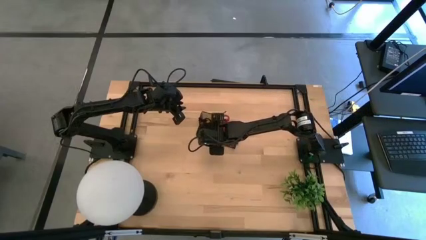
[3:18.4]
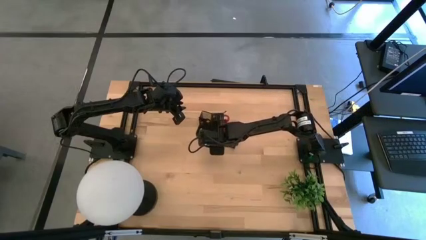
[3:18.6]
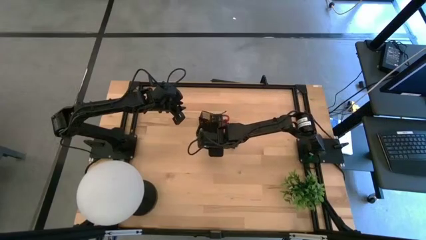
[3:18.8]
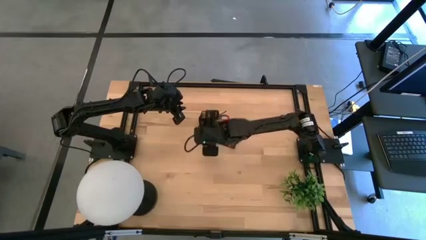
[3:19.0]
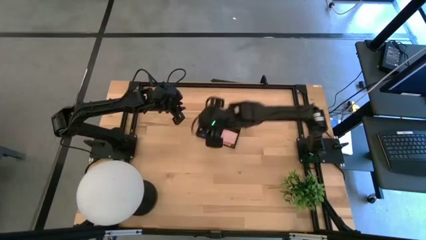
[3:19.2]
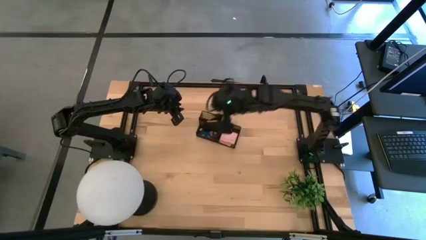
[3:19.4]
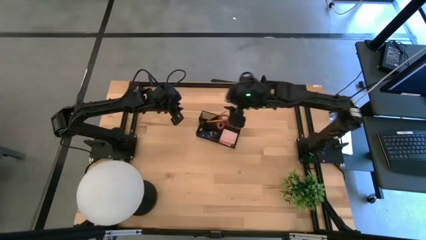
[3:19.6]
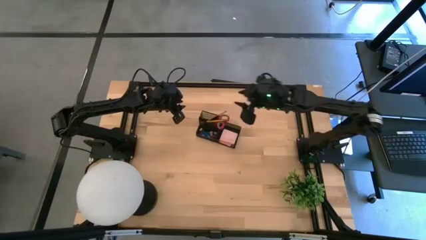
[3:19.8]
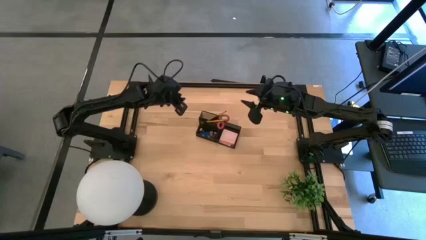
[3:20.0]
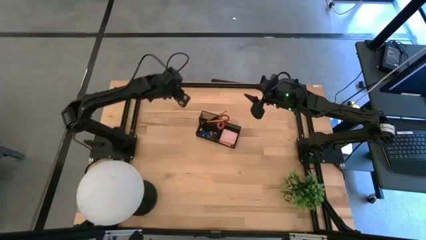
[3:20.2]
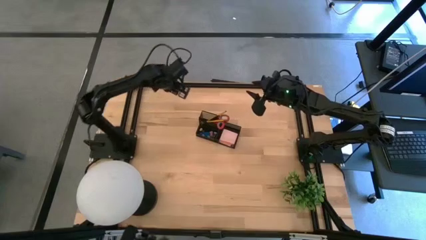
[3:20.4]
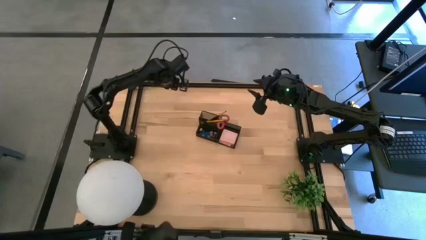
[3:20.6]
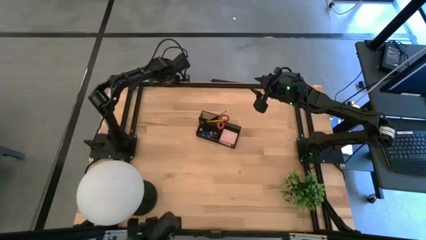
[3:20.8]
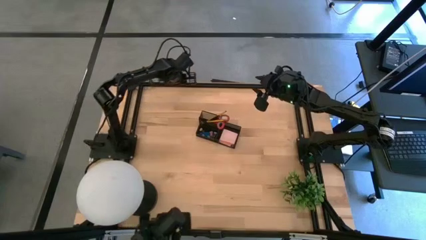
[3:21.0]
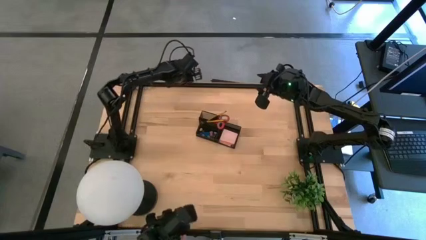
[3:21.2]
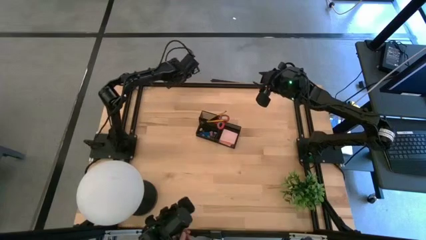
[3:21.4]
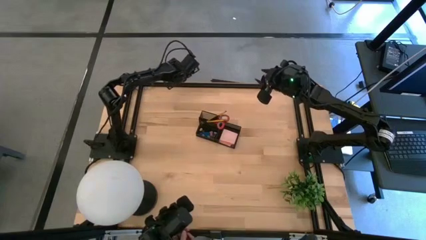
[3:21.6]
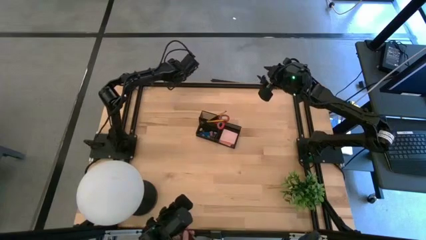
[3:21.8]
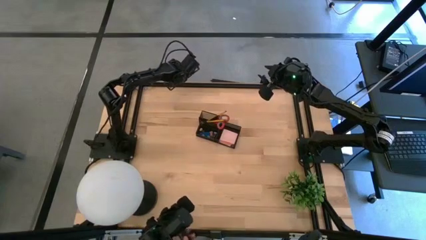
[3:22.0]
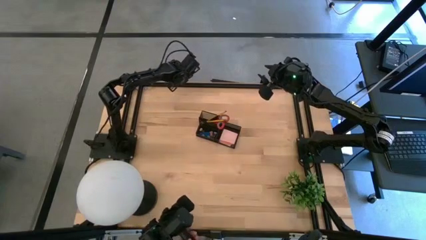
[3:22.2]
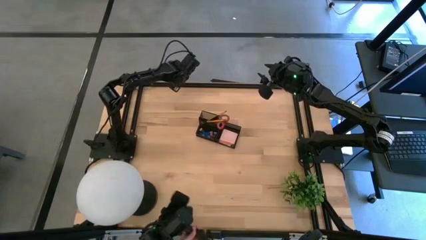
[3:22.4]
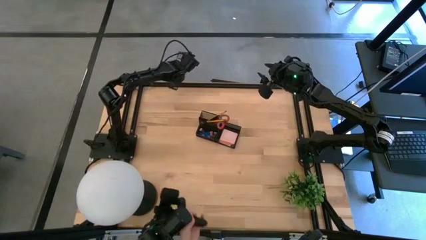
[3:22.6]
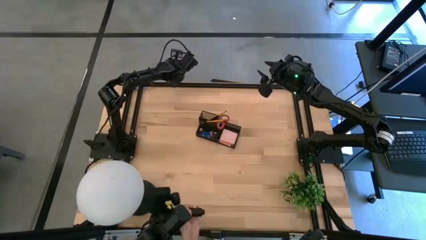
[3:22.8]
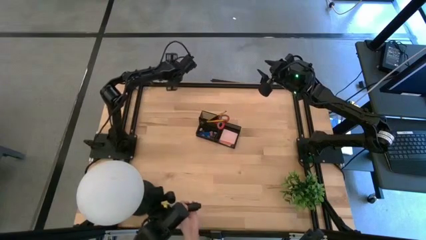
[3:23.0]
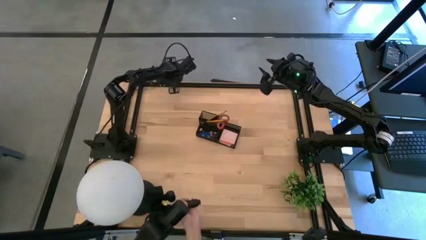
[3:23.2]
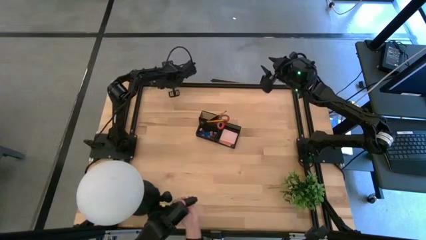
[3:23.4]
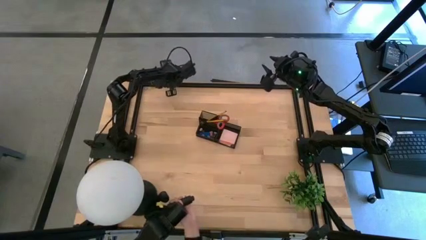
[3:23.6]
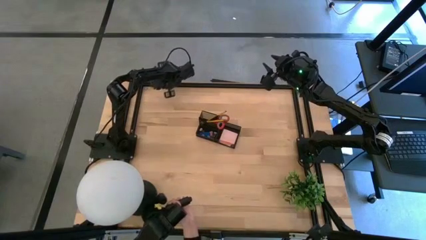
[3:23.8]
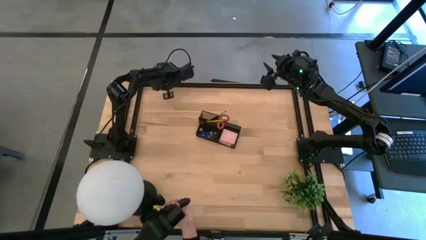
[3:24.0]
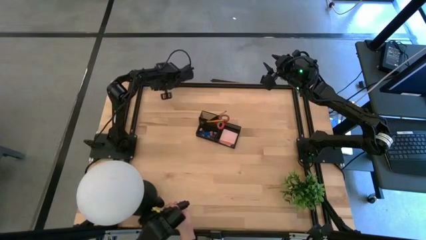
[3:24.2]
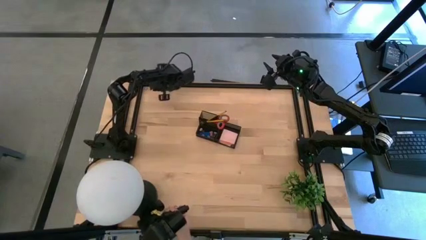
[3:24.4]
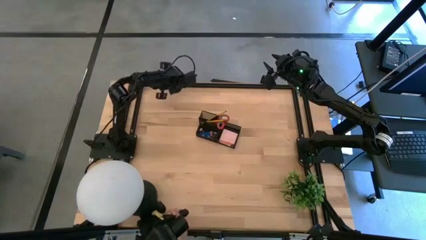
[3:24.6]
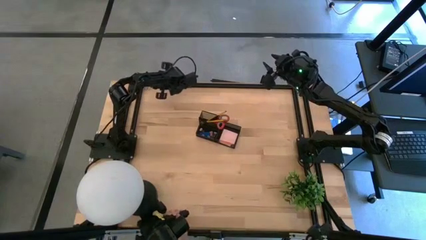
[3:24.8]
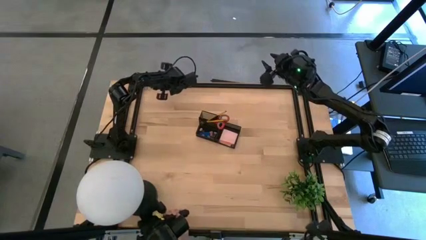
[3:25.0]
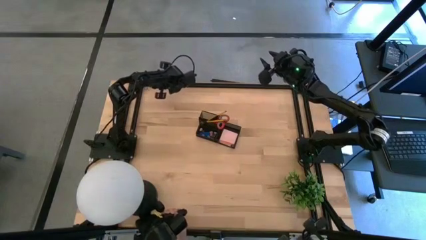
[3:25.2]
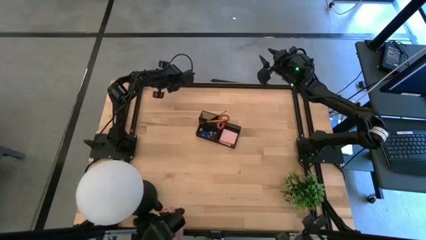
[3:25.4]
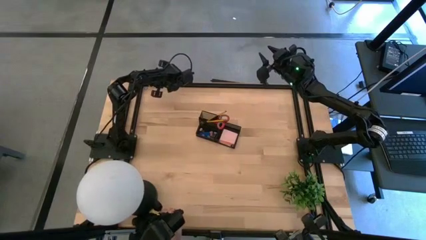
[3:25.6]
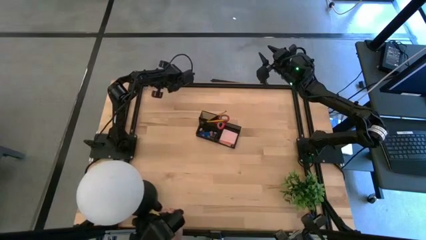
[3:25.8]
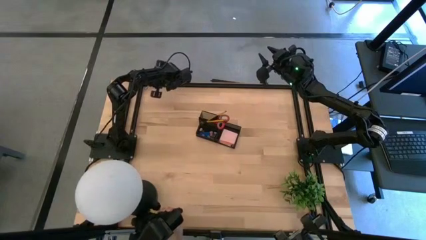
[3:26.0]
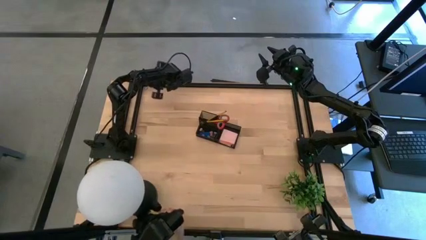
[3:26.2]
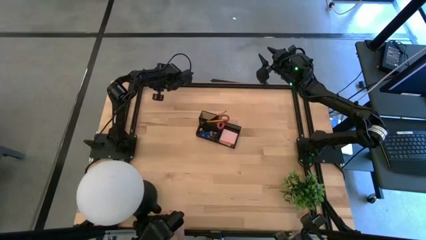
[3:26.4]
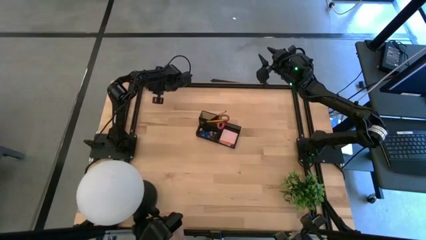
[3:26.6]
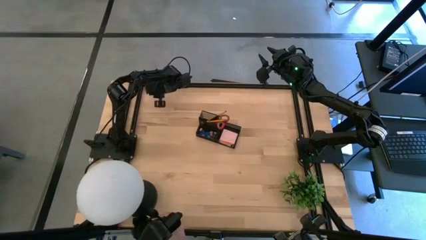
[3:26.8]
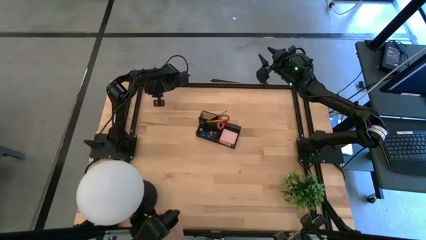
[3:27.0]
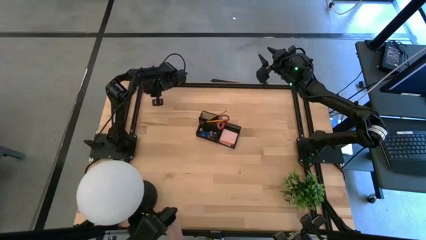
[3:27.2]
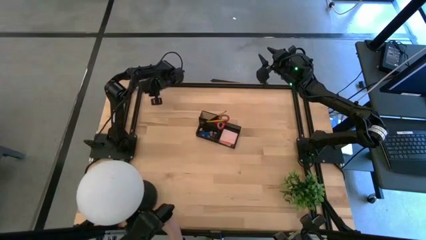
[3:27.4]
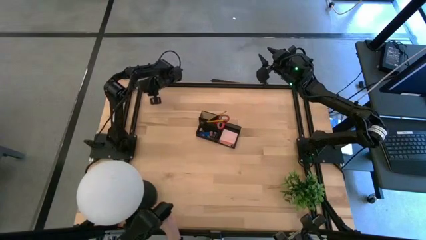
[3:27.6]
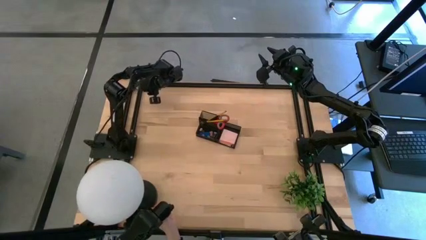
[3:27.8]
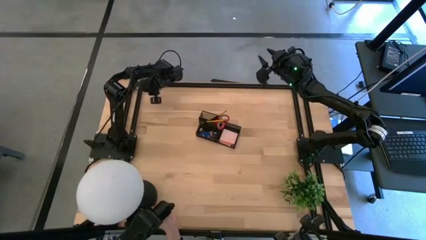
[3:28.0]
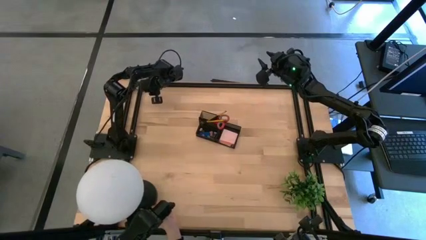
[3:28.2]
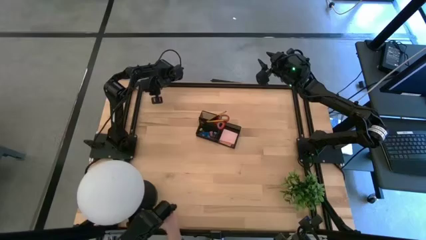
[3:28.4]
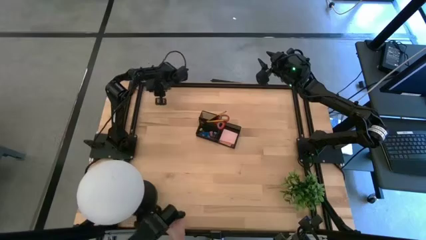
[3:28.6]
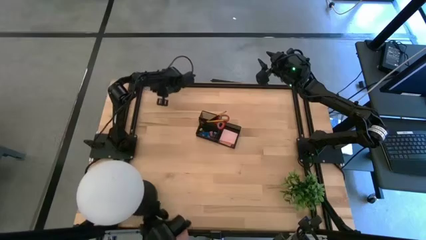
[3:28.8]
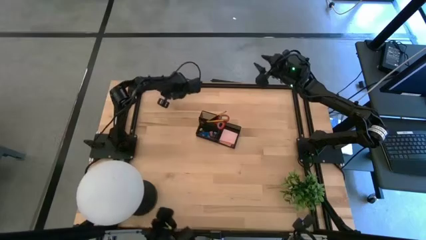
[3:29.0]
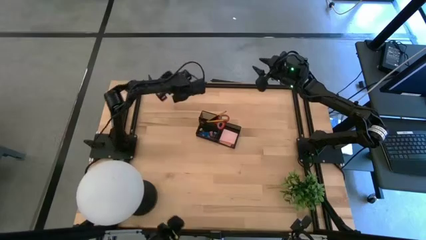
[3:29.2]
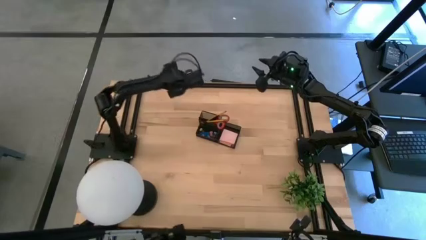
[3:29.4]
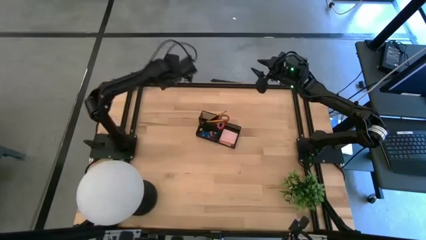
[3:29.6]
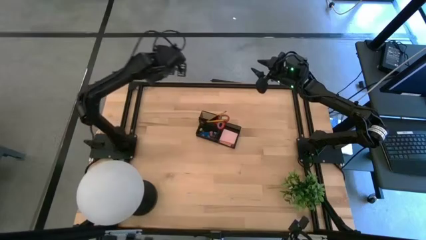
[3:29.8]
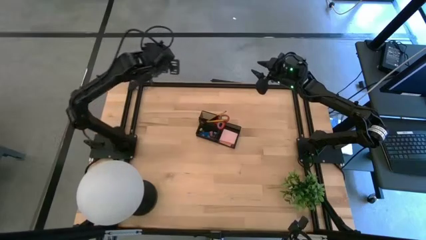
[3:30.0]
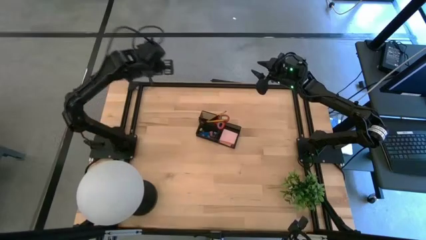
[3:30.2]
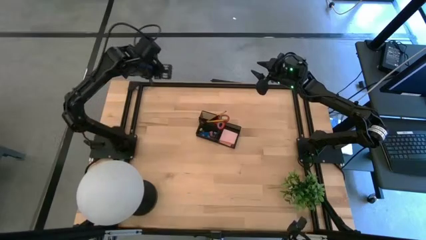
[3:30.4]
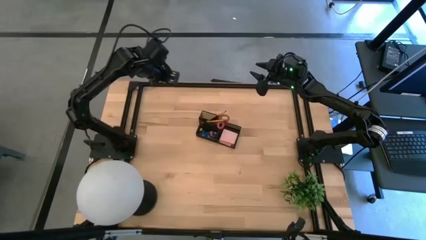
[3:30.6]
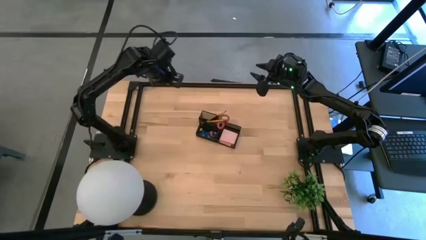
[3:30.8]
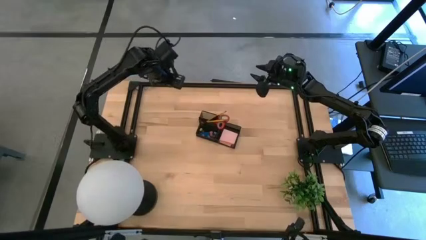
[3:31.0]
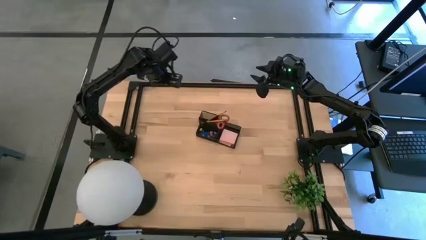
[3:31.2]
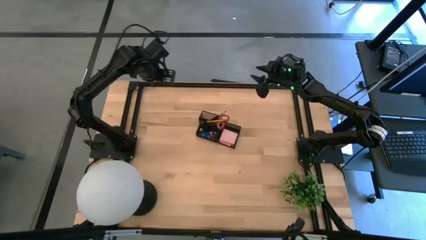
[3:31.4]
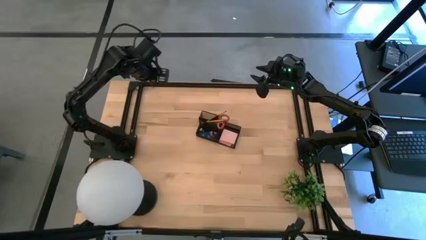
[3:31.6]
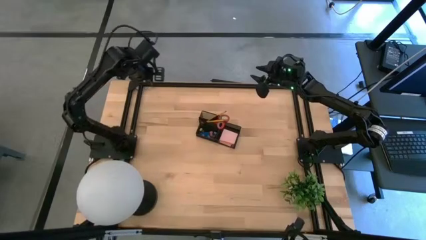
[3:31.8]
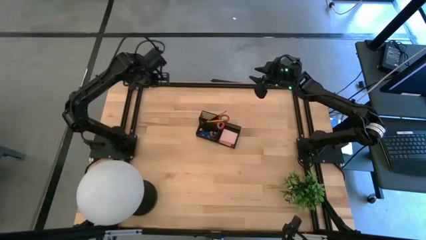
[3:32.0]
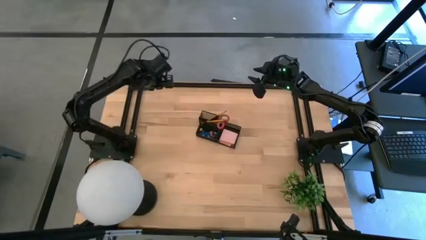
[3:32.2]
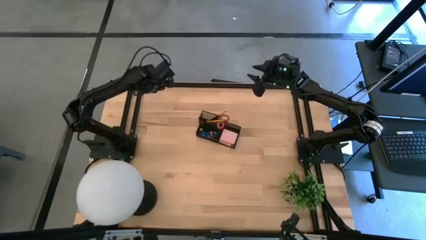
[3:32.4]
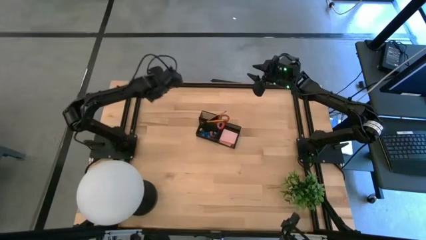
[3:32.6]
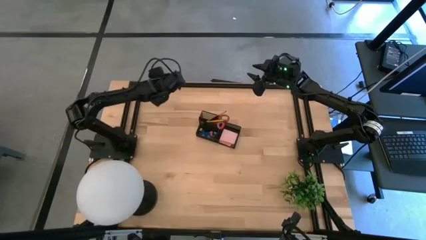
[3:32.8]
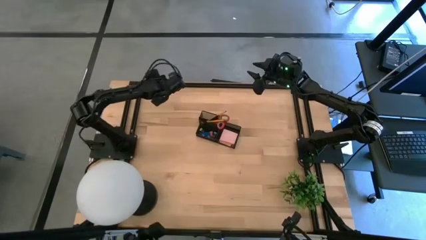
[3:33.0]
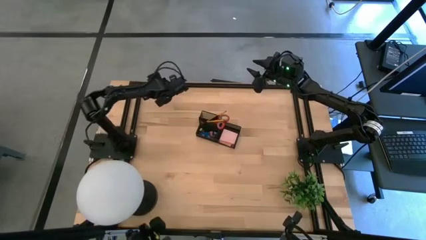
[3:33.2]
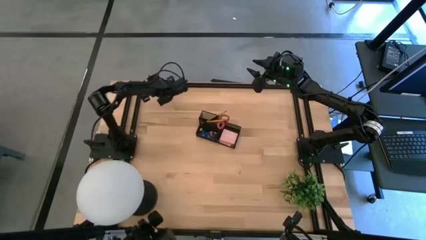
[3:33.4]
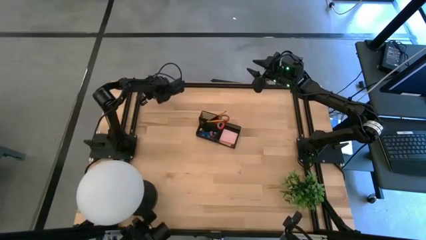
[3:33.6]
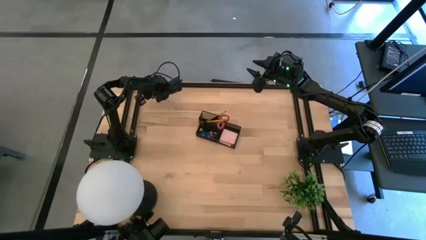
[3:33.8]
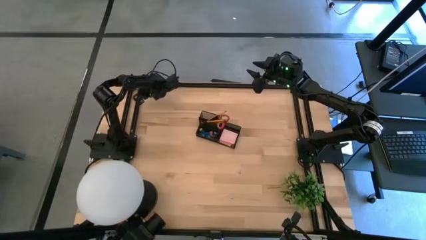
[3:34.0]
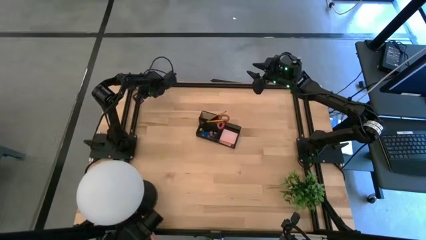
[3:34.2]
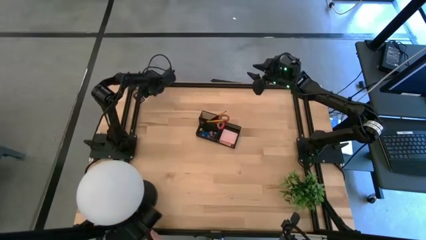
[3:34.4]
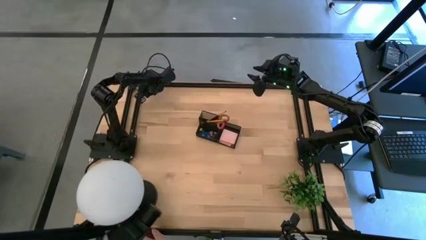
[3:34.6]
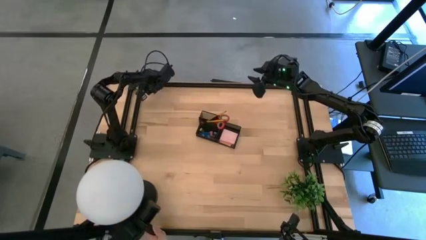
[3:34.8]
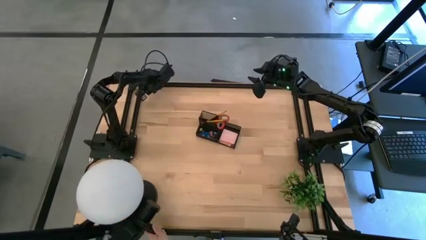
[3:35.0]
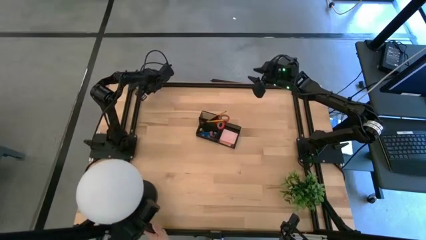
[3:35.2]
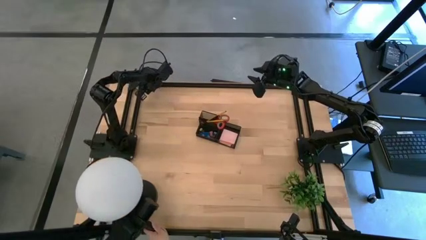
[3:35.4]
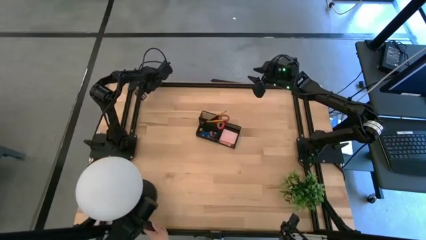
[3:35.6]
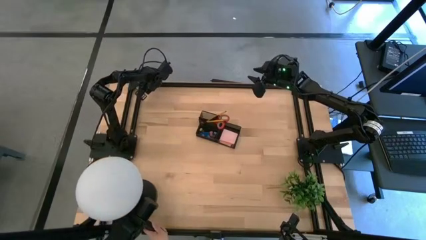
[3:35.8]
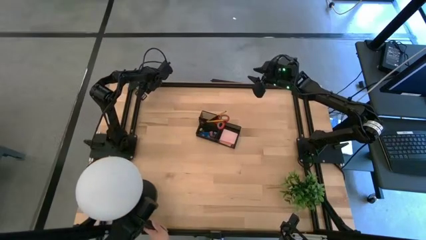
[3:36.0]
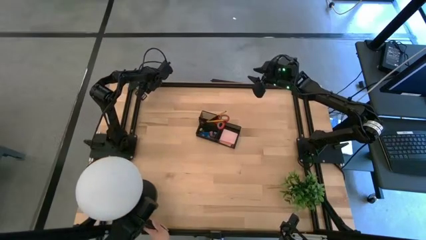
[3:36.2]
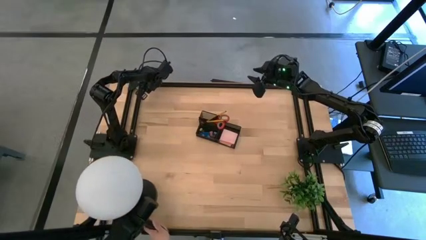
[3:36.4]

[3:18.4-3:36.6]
Task: Pick and place office supplies into organizer
Put the blue binder clip into the desk organizer
